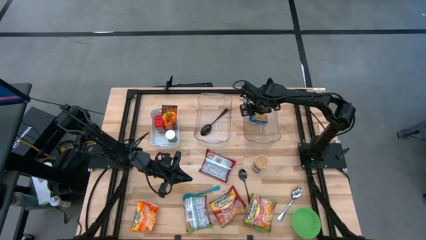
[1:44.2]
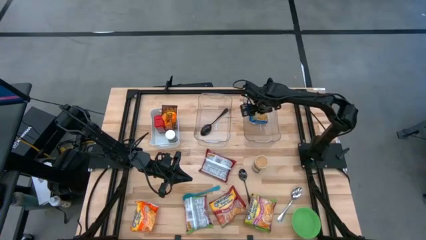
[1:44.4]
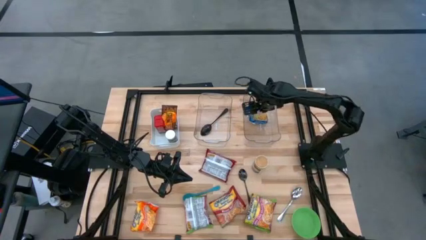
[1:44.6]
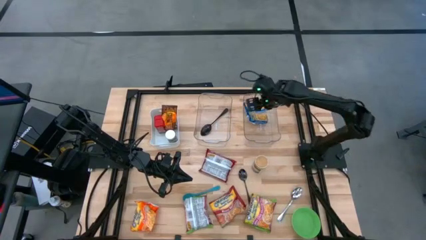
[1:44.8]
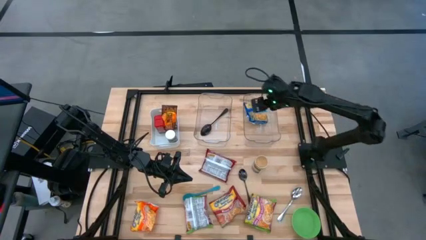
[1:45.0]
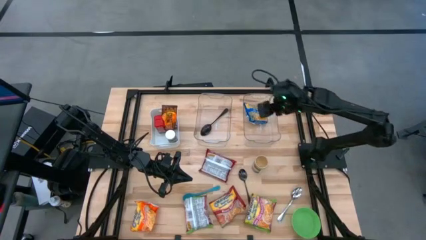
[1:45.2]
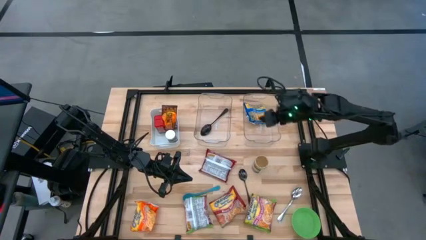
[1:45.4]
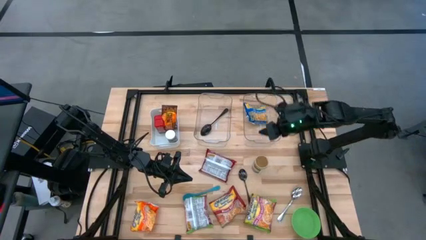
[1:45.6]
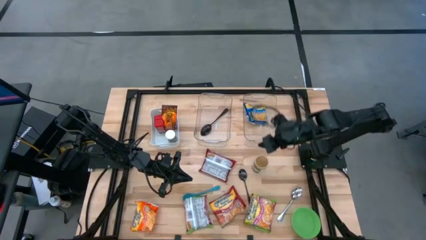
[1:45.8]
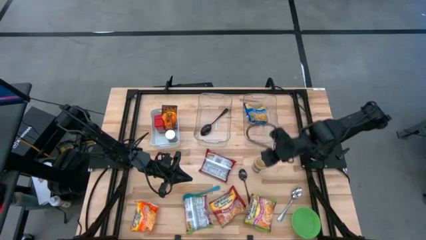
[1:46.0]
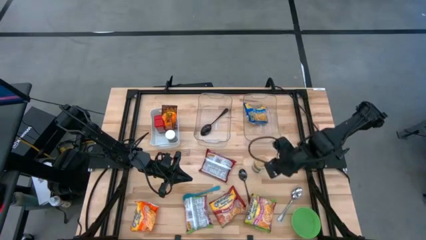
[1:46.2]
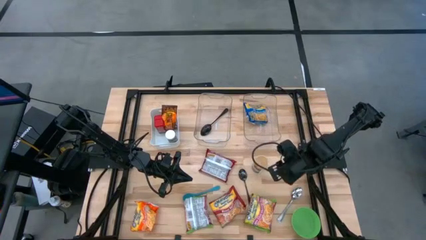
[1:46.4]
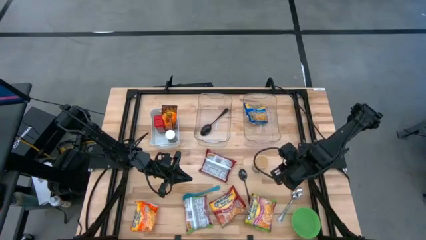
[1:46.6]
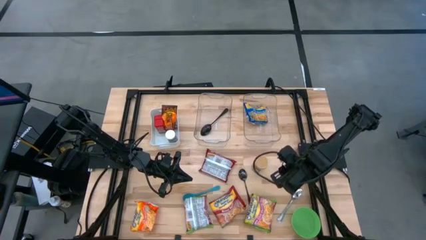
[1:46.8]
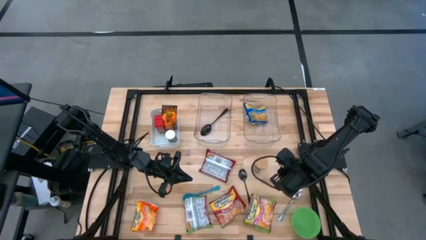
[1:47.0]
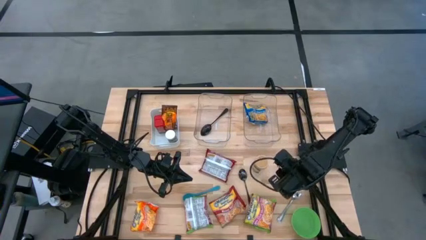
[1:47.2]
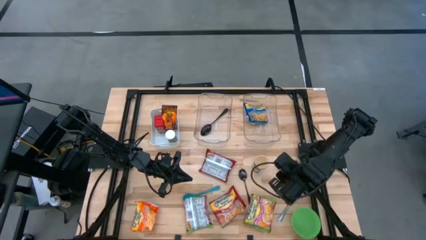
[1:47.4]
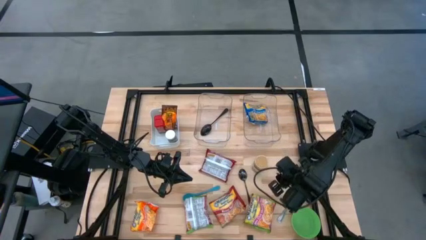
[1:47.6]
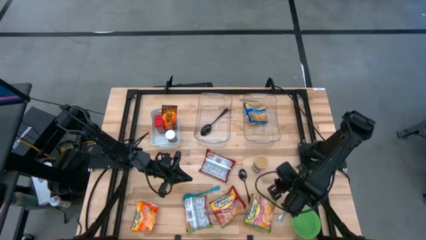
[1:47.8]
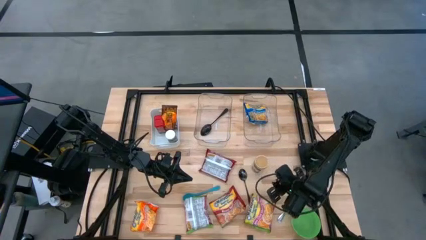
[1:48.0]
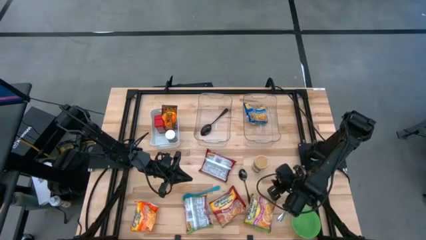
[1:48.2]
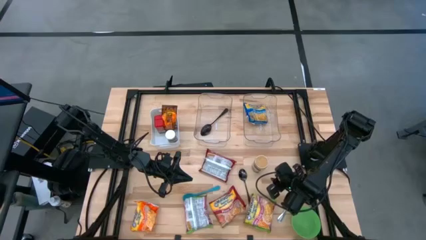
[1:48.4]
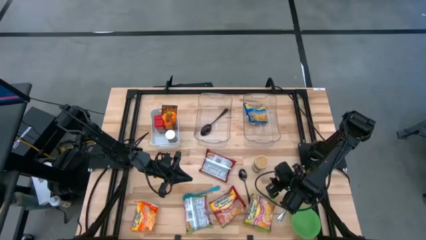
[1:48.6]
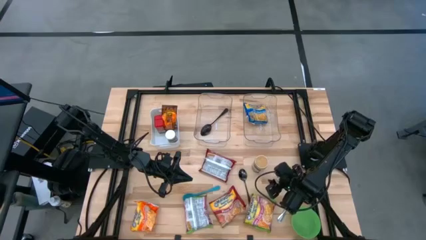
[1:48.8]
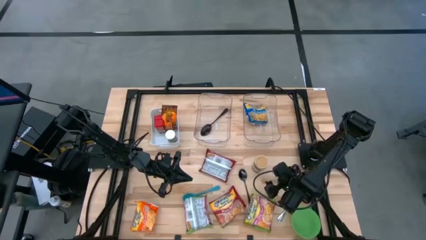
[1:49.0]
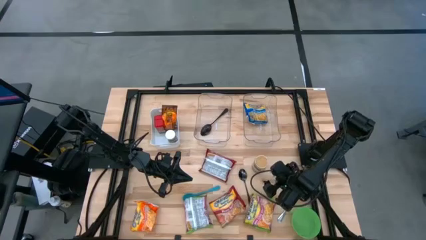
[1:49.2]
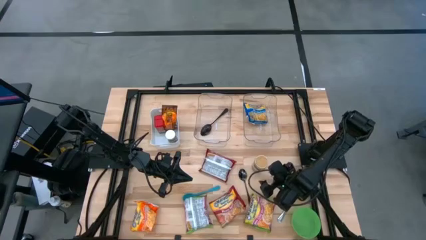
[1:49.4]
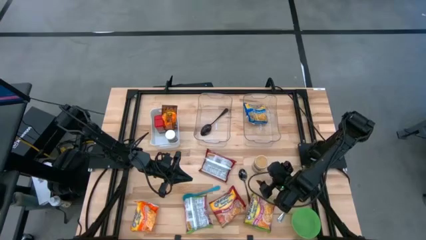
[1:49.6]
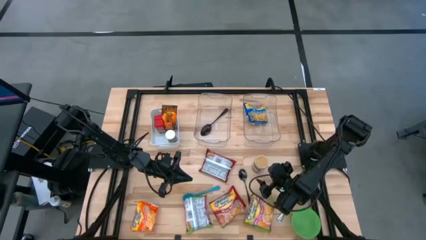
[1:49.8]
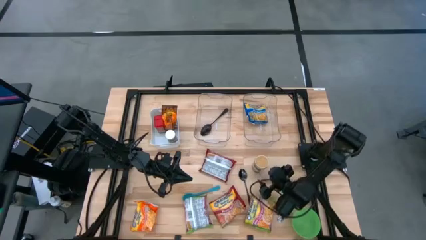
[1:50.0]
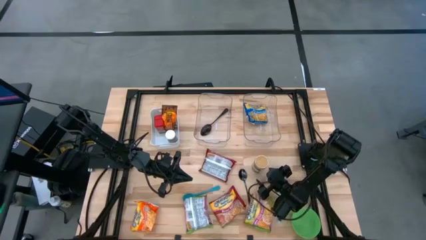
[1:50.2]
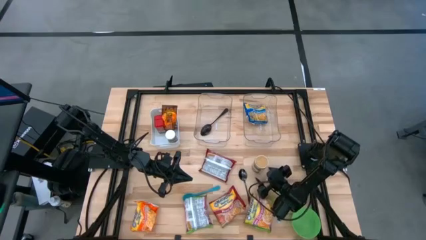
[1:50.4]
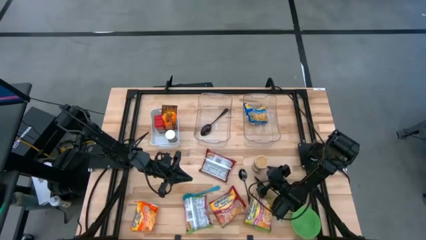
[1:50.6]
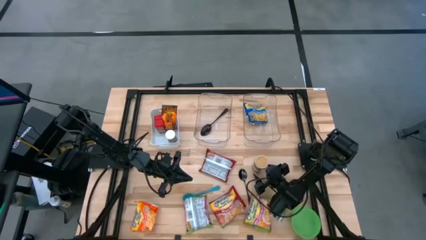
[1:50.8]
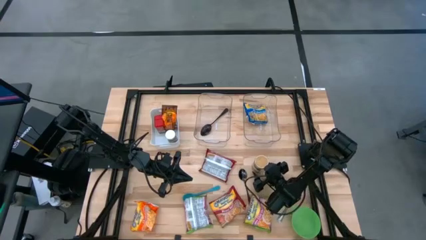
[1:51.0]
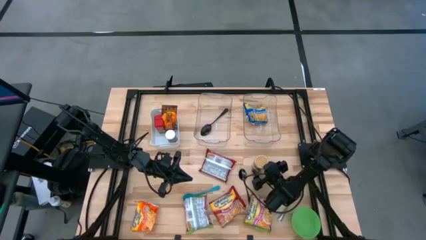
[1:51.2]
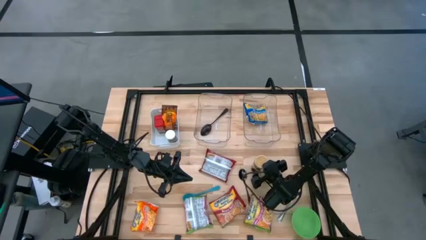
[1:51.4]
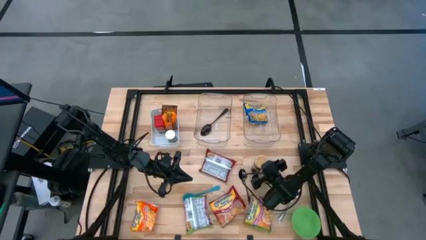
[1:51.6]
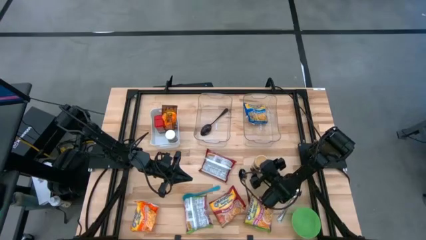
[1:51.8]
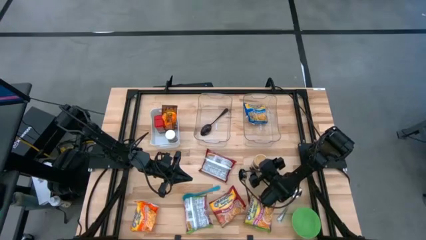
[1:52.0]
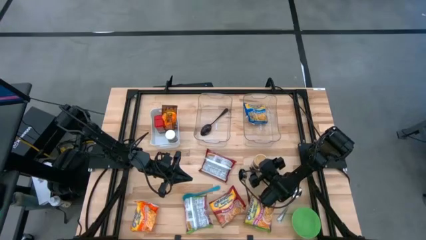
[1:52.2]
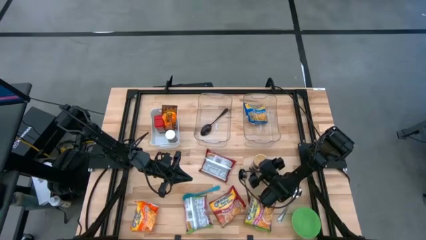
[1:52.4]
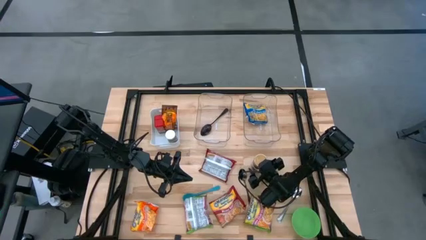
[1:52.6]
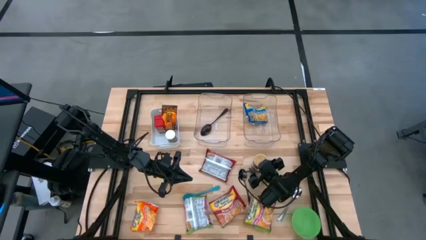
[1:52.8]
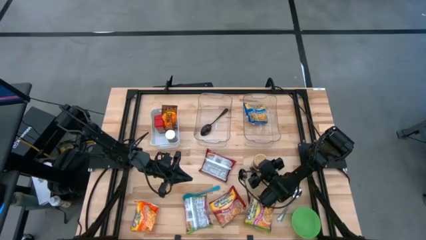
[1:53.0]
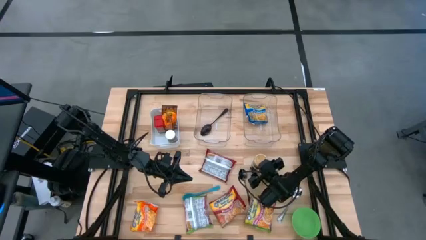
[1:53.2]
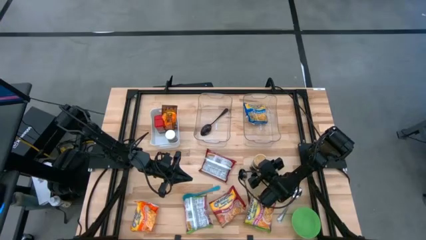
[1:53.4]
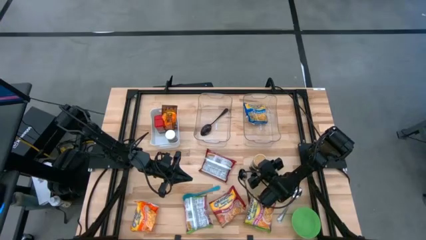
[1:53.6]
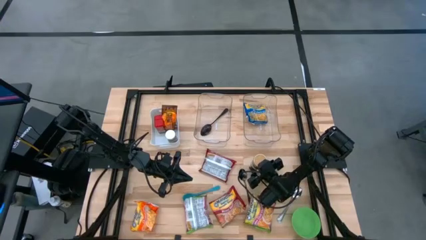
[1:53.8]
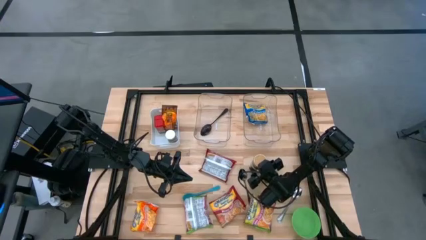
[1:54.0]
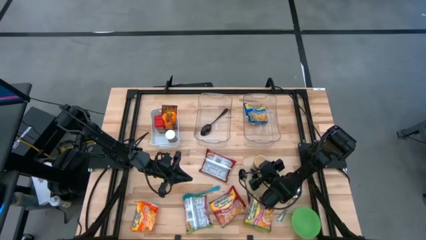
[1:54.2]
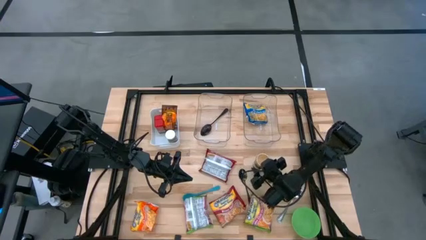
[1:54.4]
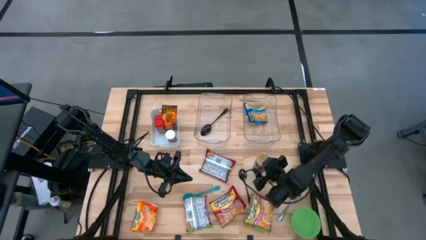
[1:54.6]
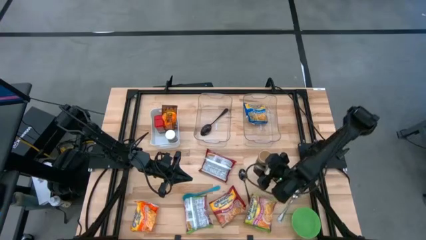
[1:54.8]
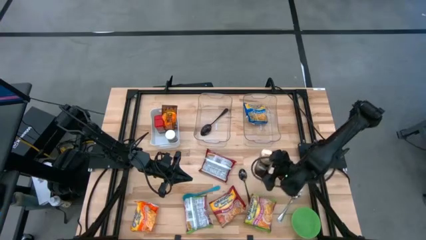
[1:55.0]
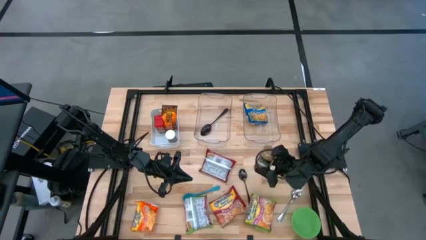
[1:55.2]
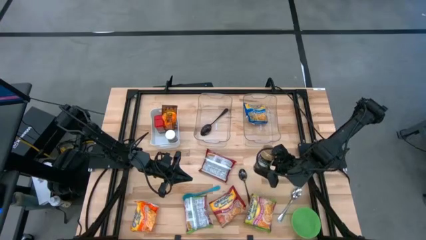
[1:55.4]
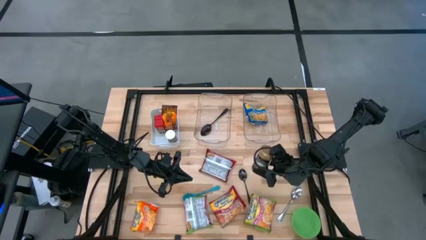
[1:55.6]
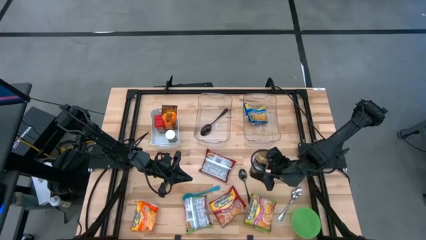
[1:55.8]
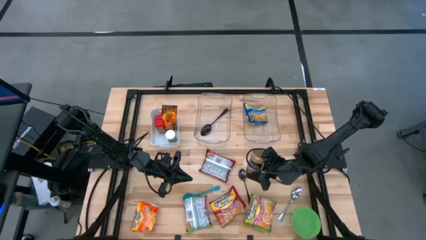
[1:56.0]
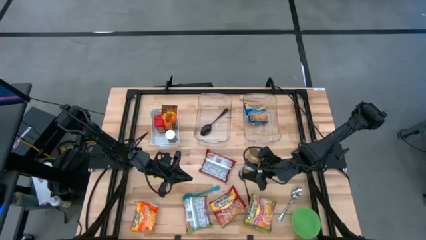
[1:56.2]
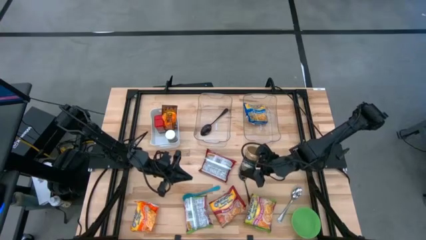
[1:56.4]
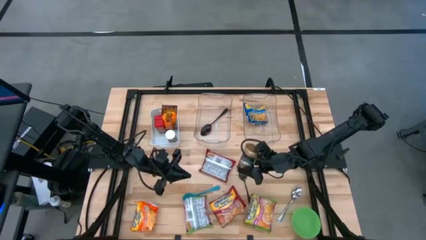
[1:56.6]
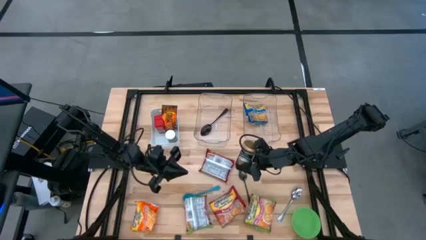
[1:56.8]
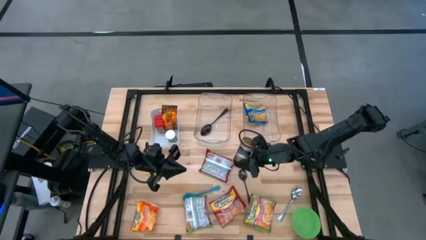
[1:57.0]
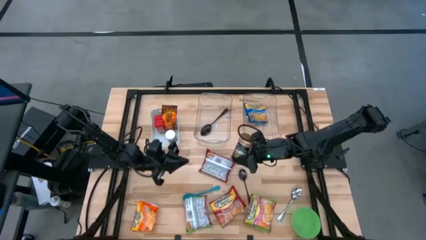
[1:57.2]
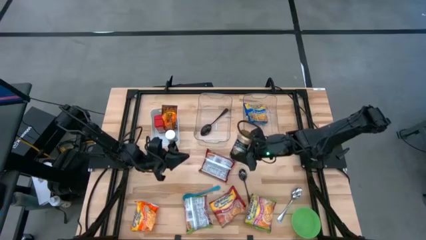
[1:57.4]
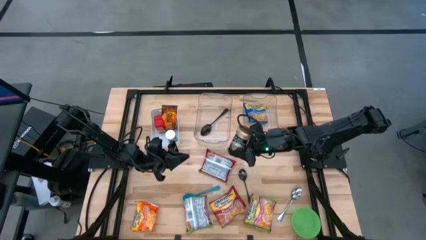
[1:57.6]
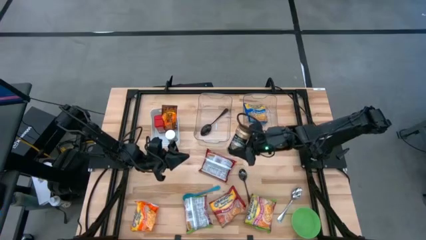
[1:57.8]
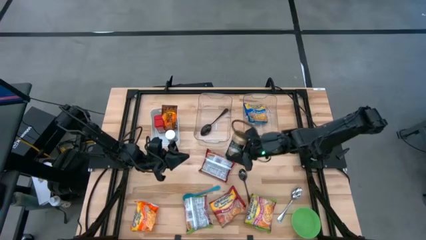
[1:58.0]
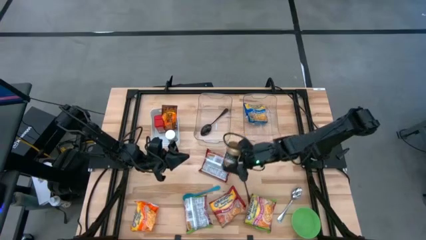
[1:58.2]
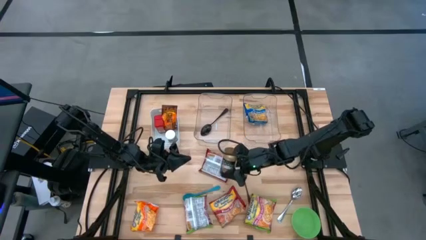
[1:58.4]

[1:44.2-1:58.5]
Task: Pick & Place Food Item
Put the gold seasoning bottle into the white bin
